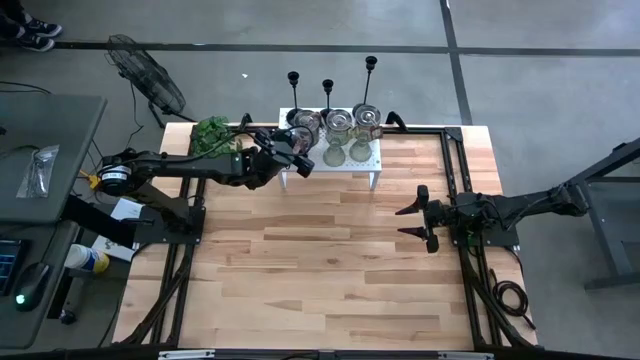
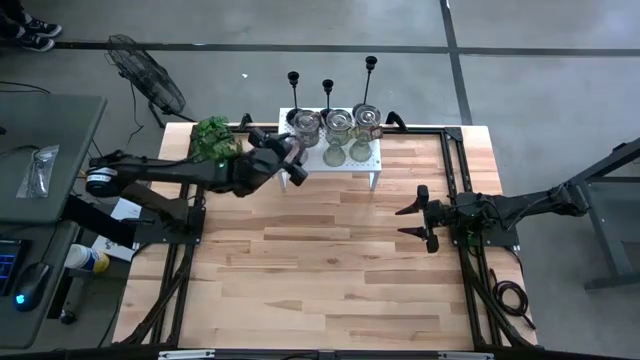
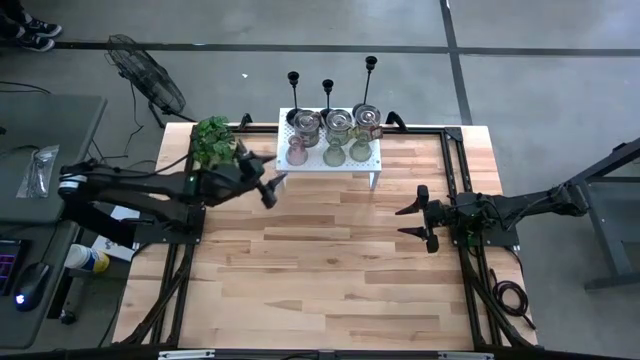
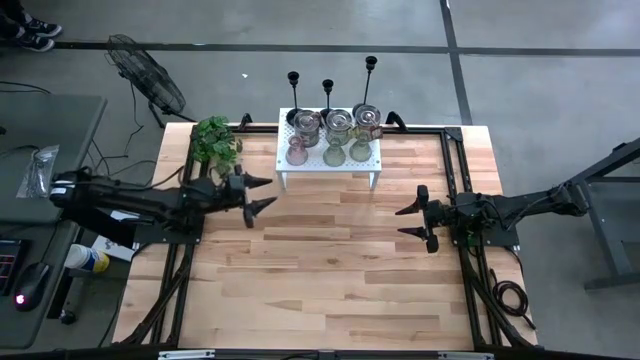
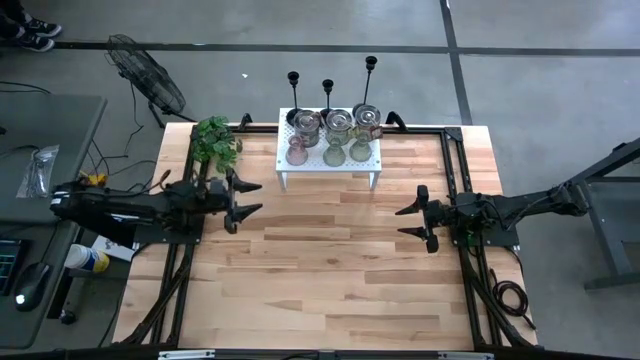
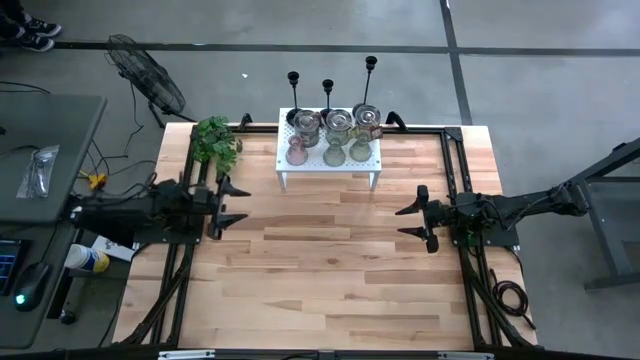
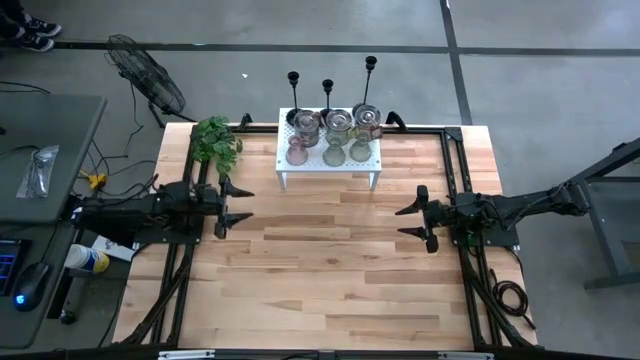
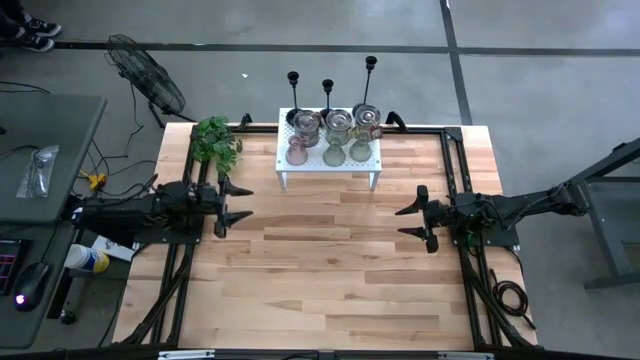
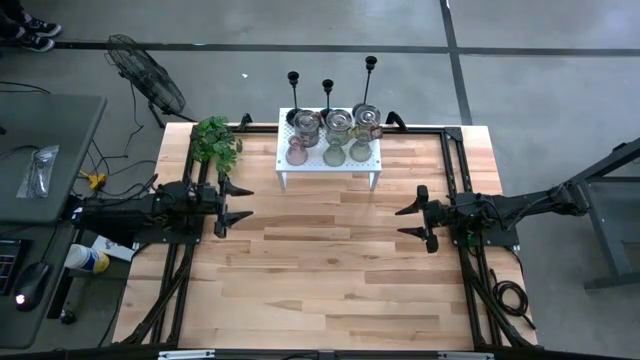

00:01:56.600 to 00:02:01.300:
Task: Pick & Place candle stick holders
Return to Home Position

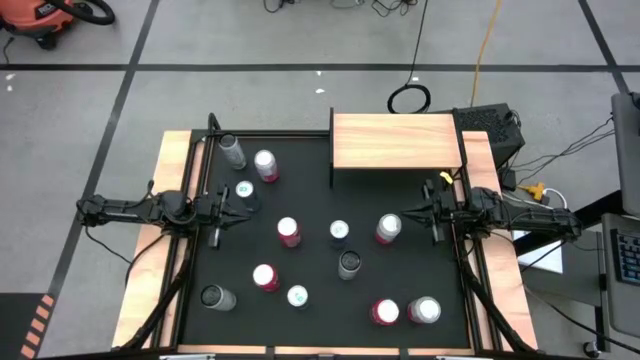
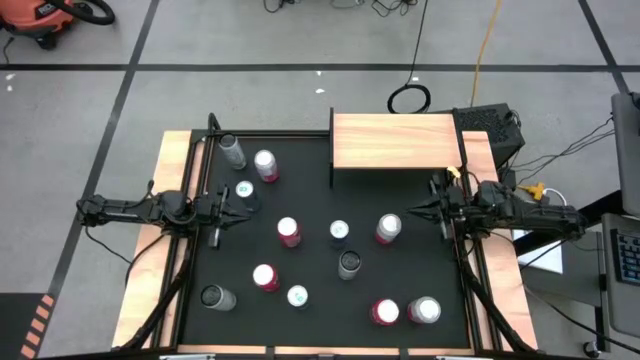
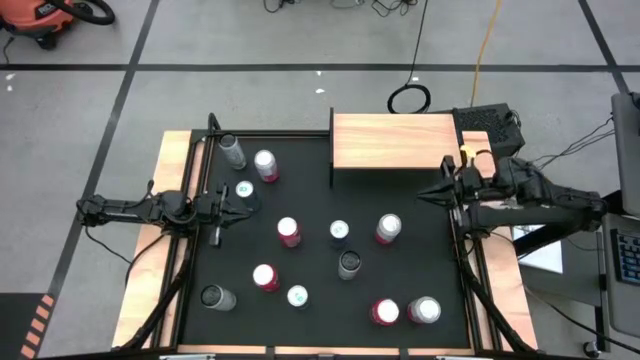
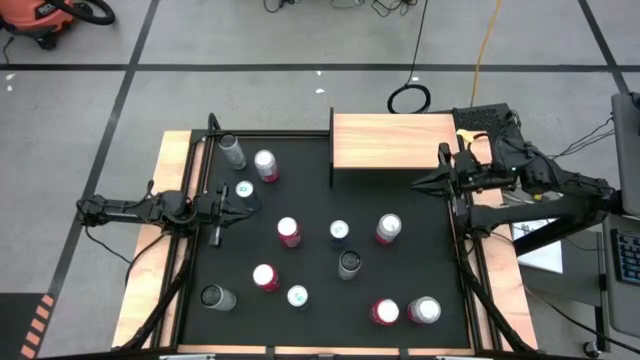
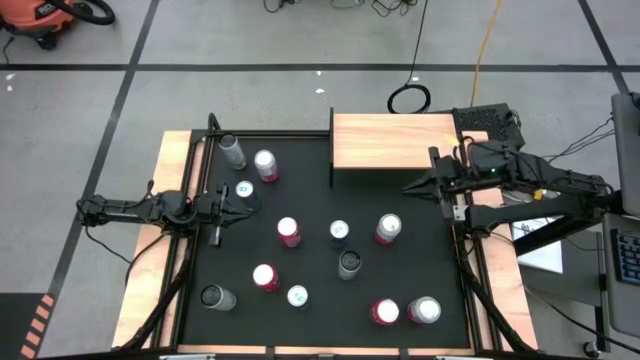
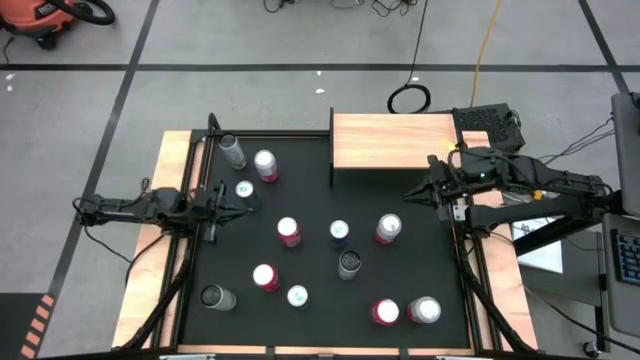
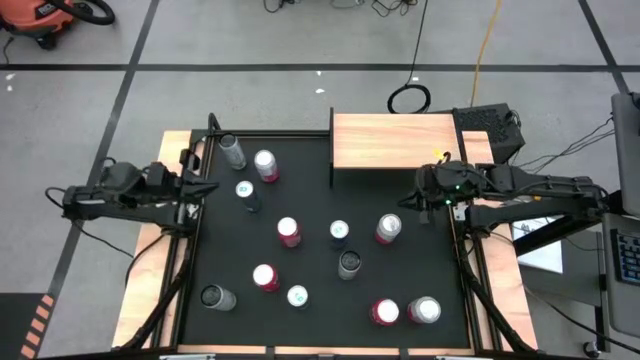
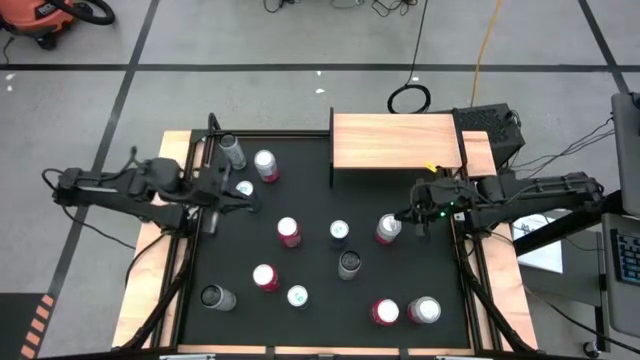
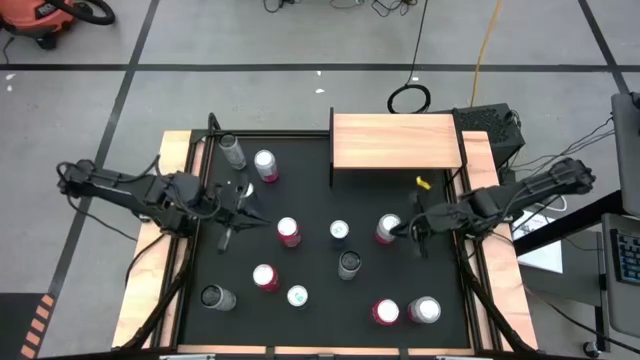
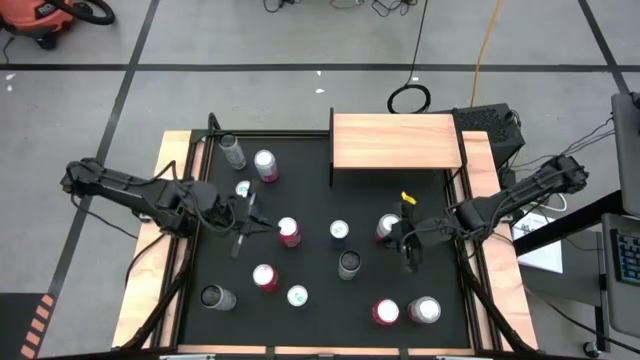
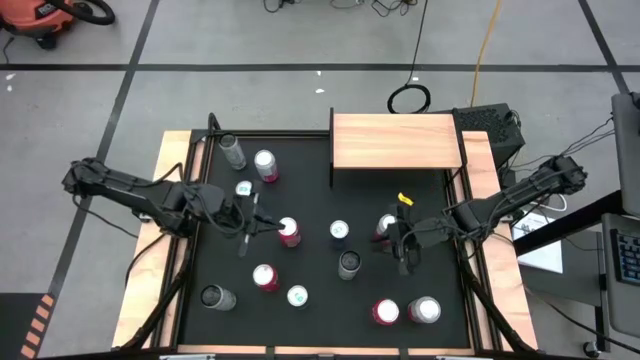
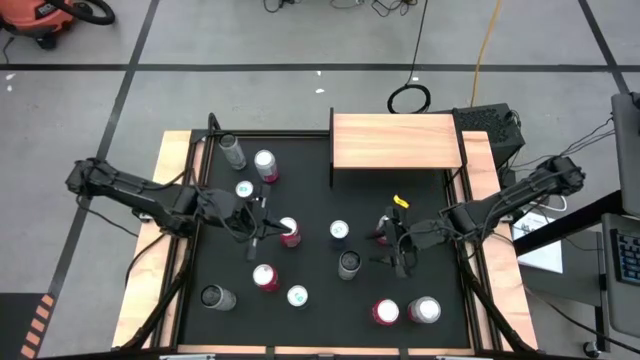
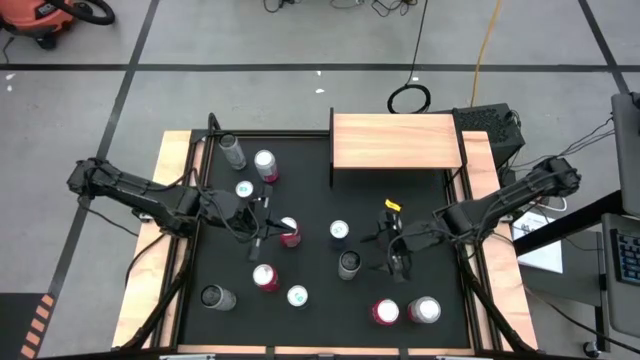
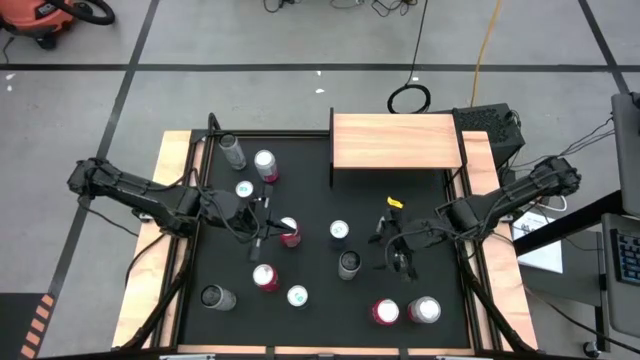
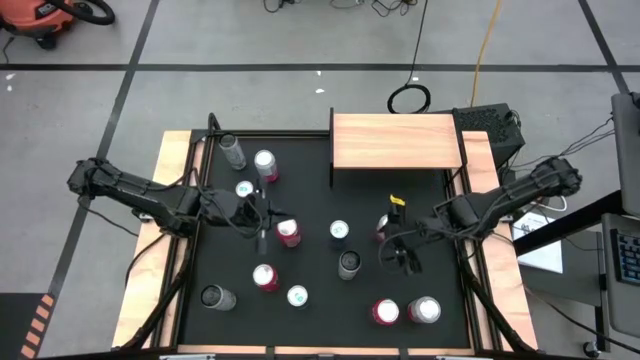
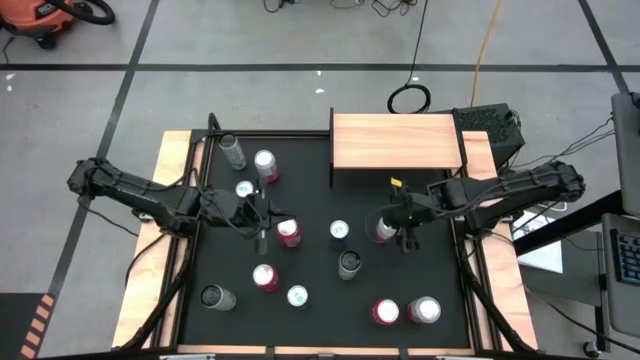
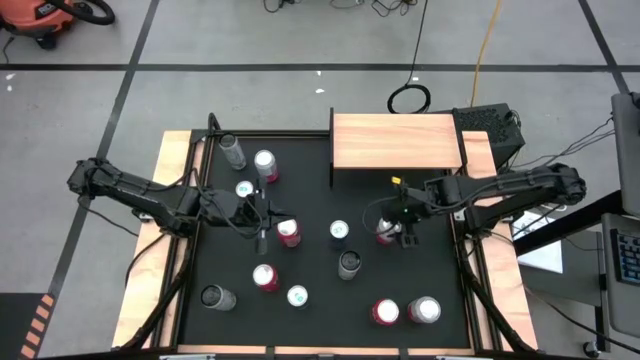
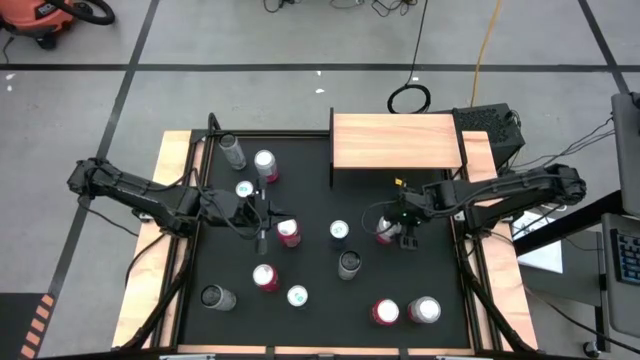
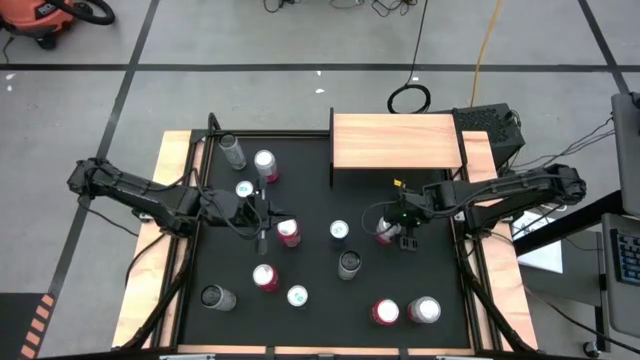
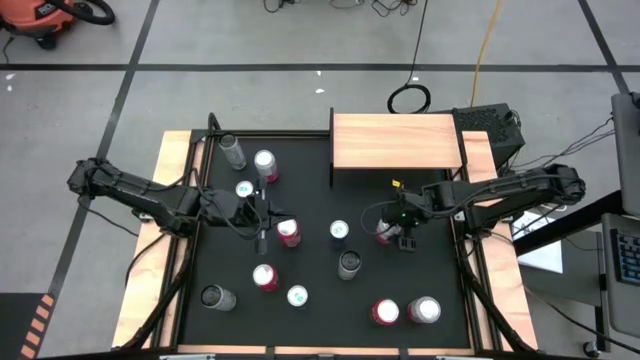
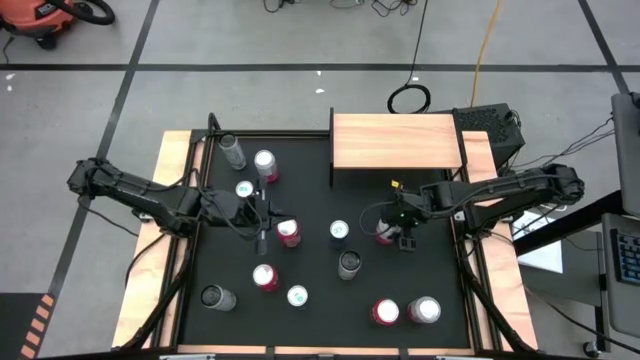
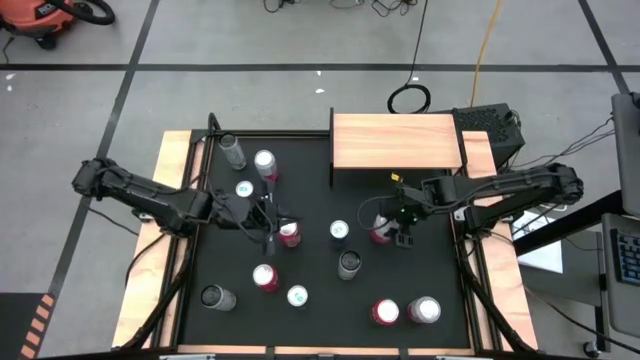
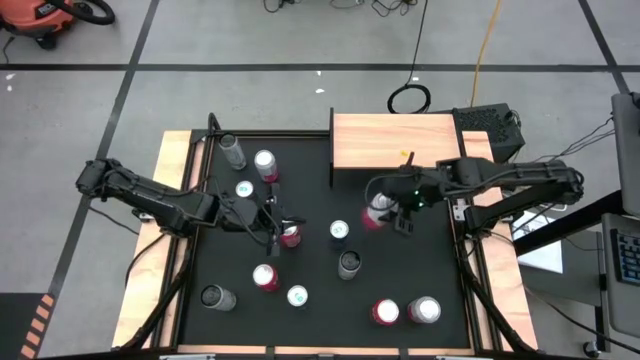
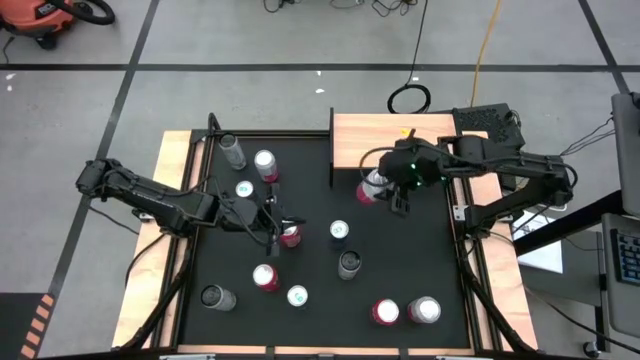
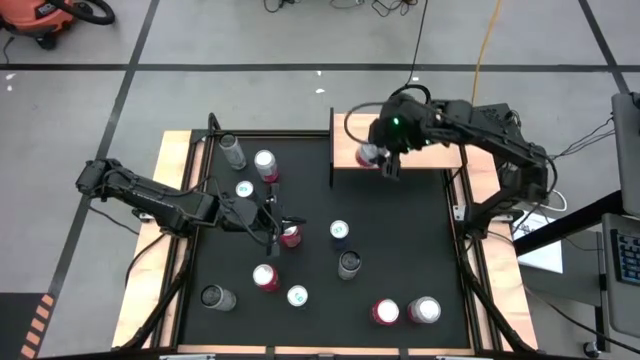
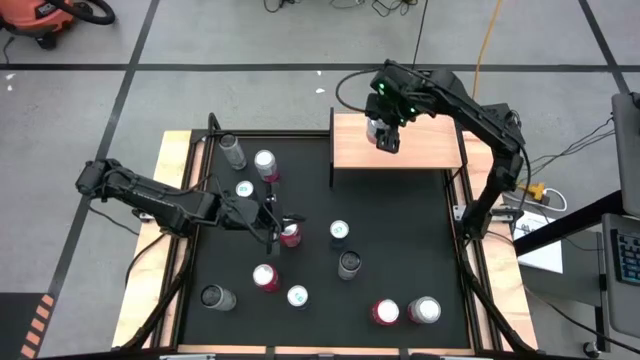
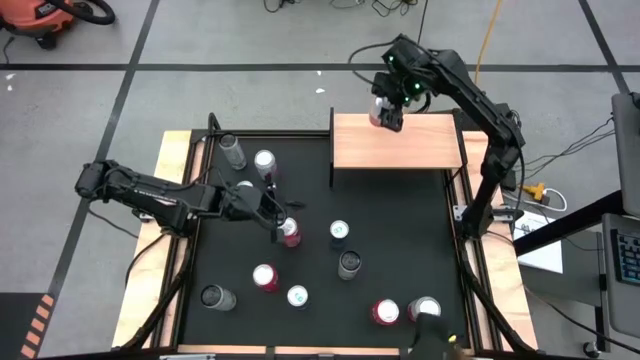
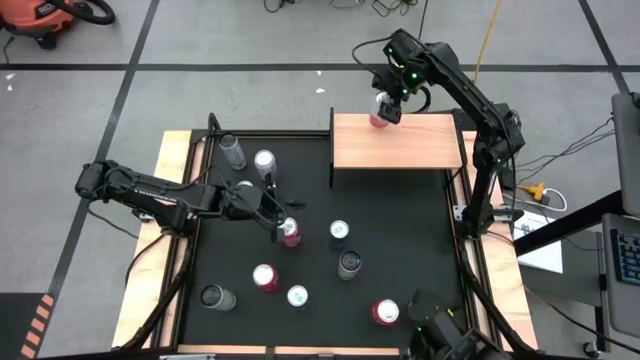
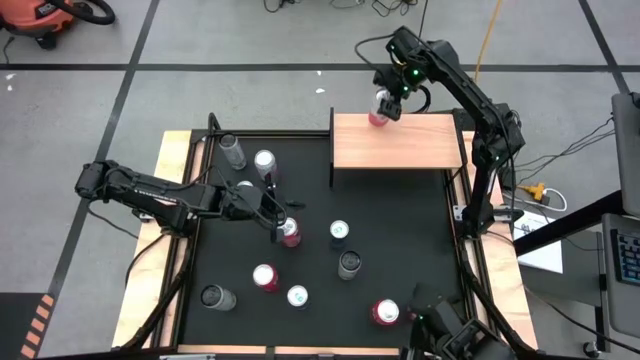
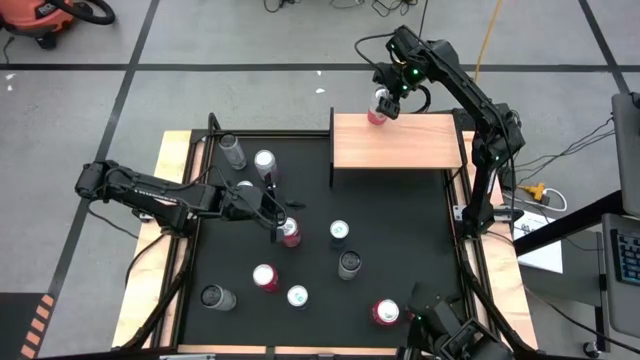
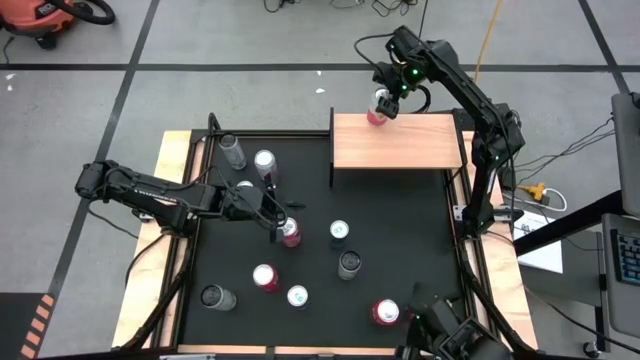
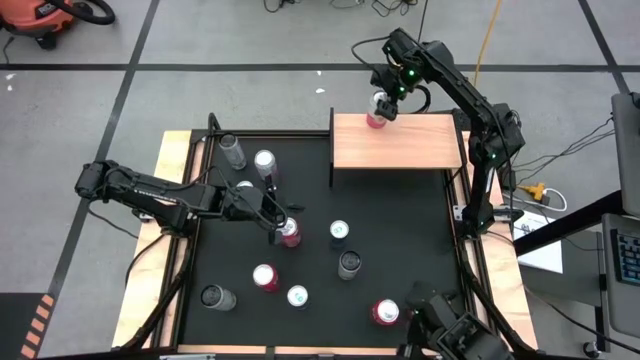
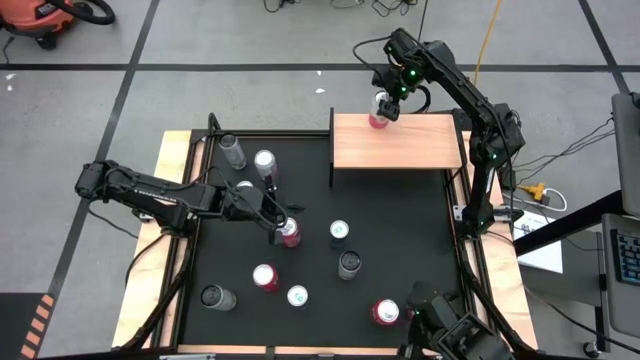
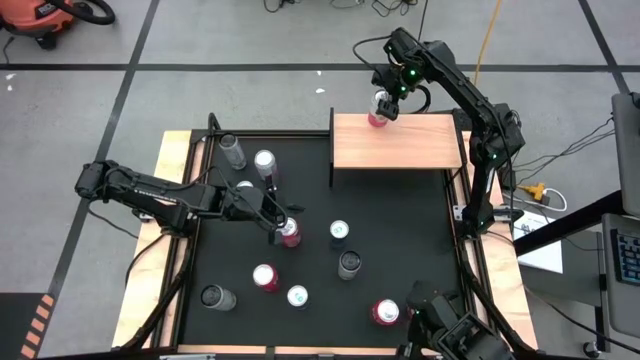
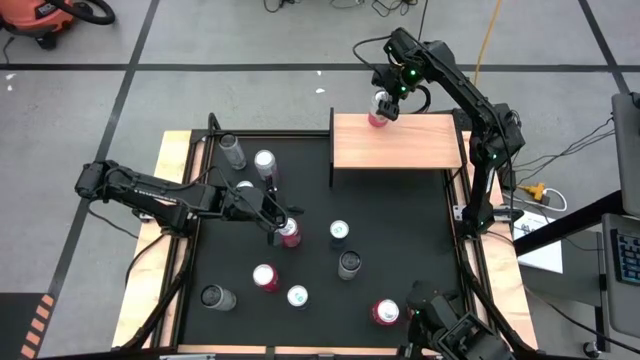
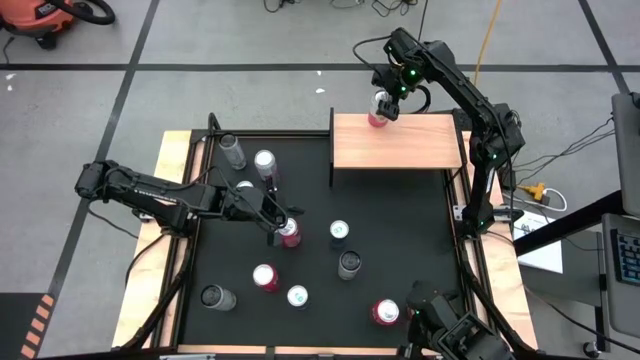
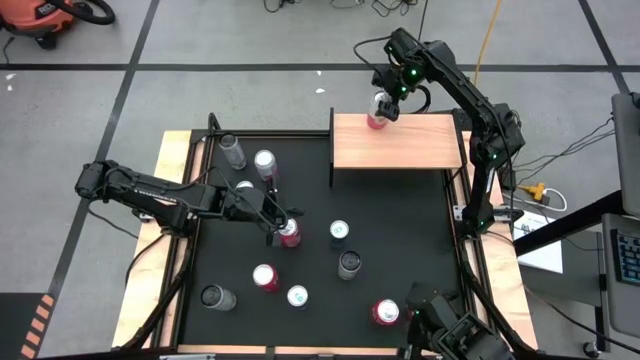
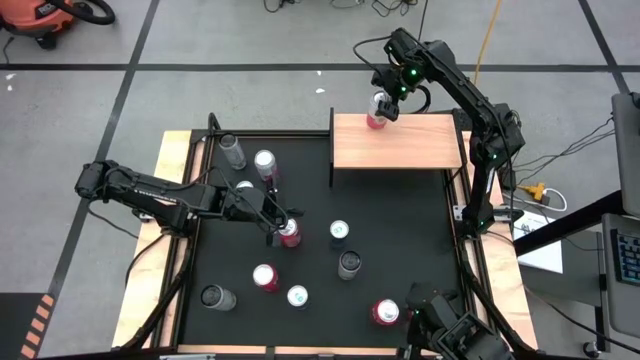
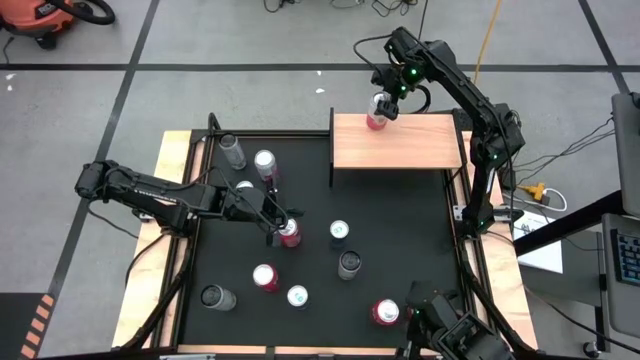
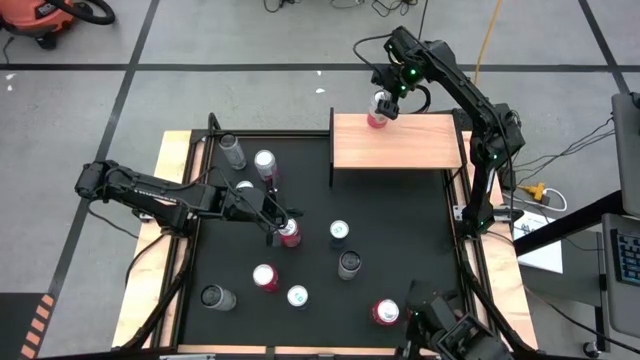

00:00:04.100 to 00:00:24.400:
Task: Place canned beverage on shelf
Put the middle pink white soda can on the shelf
